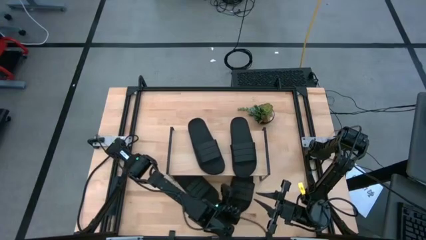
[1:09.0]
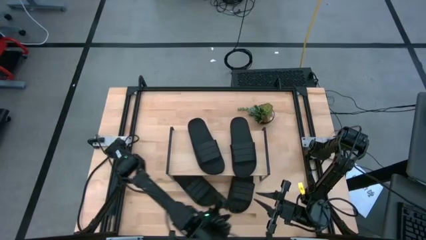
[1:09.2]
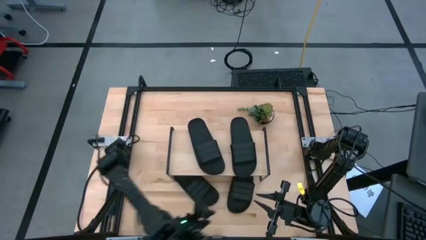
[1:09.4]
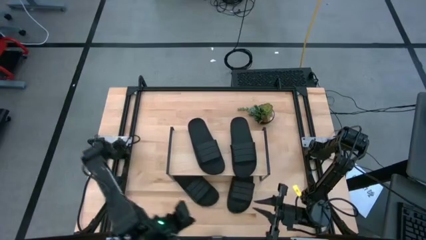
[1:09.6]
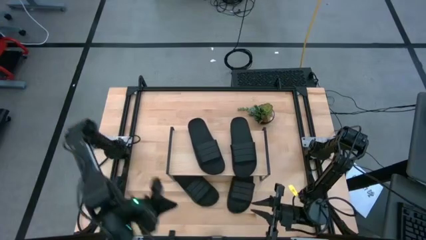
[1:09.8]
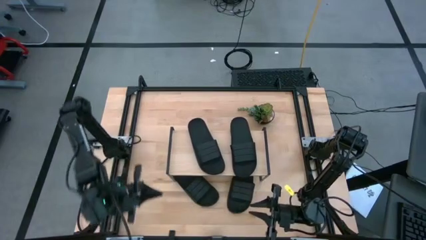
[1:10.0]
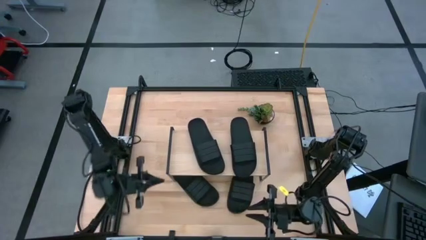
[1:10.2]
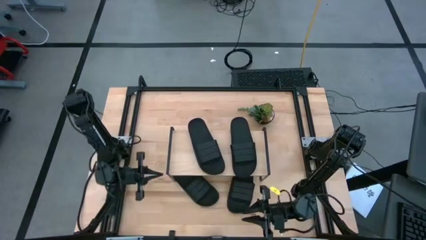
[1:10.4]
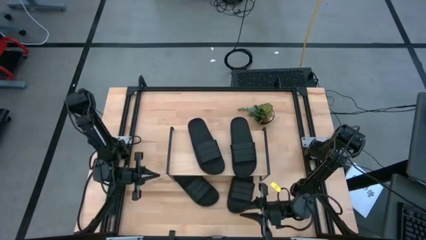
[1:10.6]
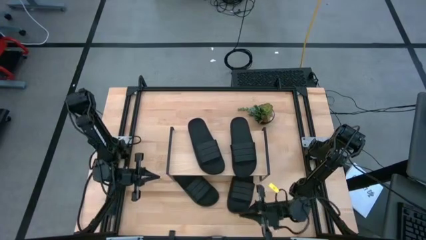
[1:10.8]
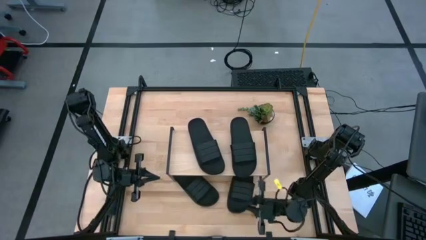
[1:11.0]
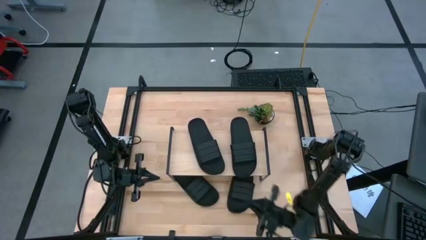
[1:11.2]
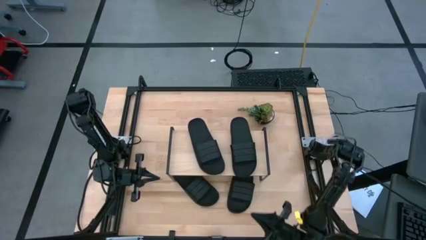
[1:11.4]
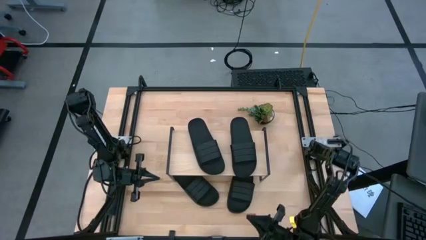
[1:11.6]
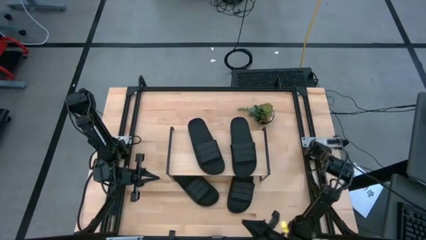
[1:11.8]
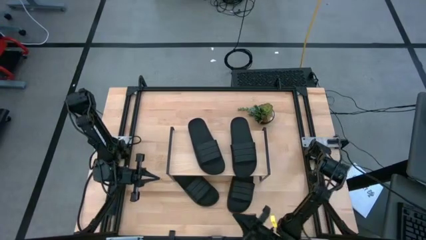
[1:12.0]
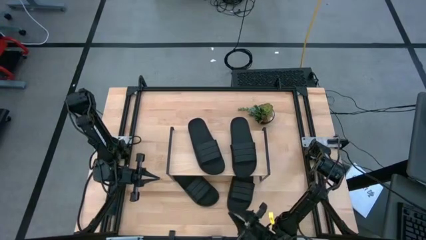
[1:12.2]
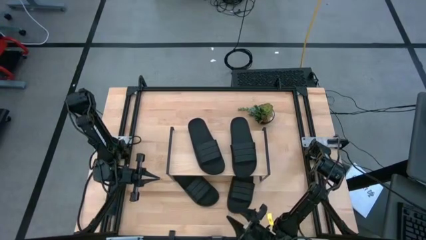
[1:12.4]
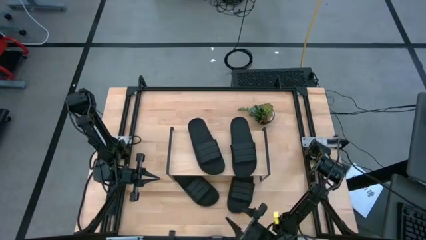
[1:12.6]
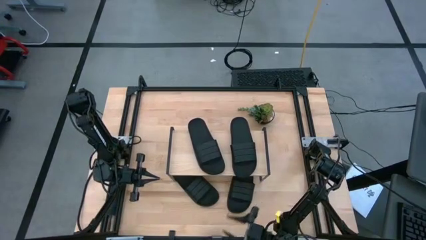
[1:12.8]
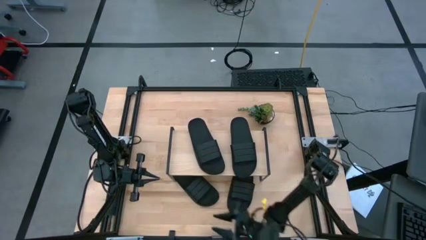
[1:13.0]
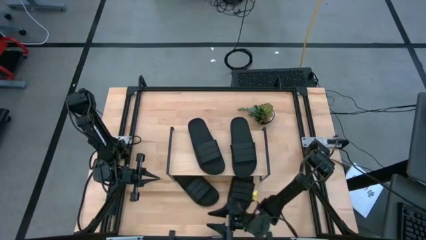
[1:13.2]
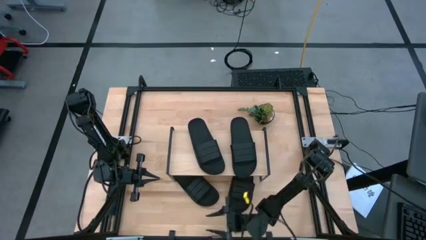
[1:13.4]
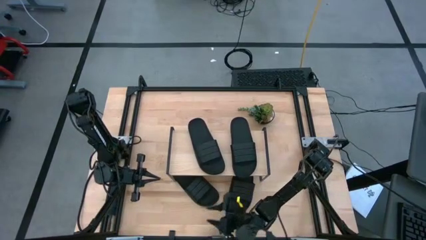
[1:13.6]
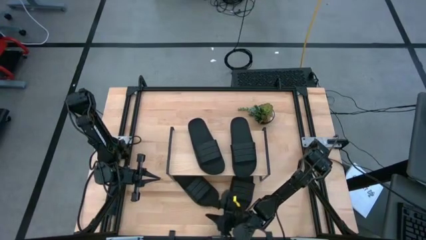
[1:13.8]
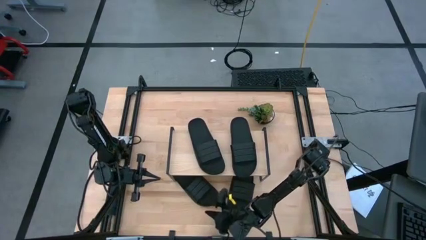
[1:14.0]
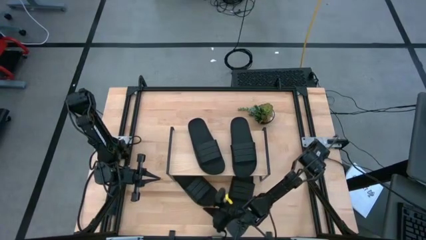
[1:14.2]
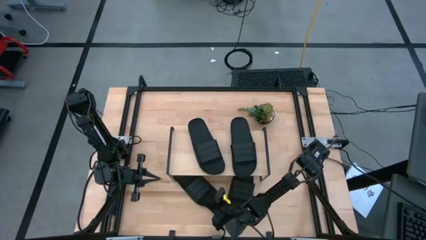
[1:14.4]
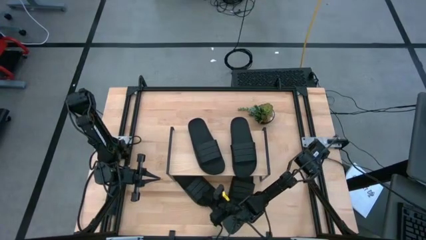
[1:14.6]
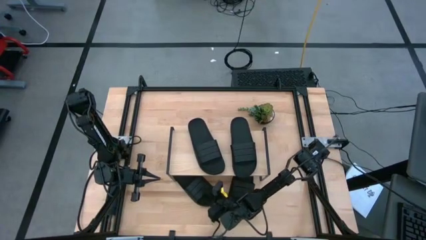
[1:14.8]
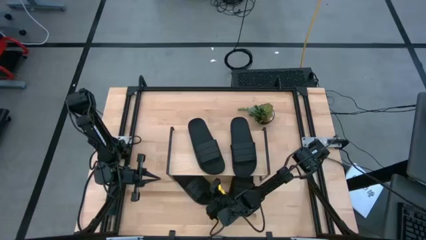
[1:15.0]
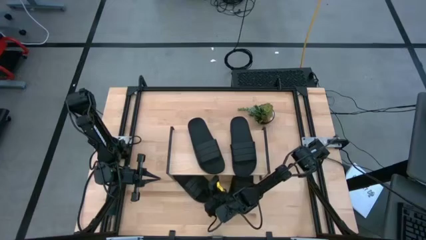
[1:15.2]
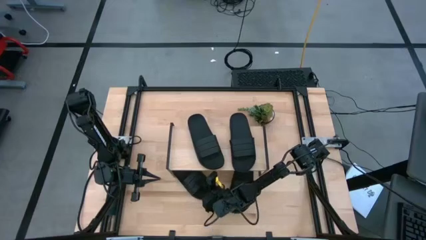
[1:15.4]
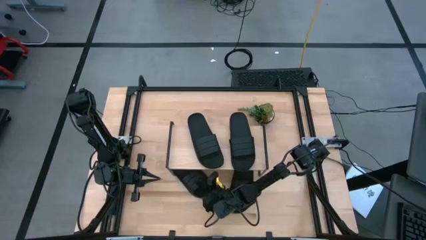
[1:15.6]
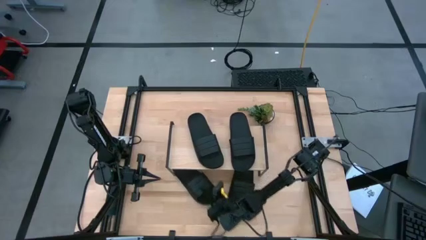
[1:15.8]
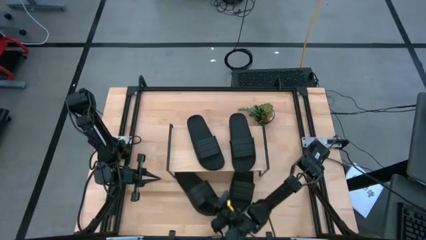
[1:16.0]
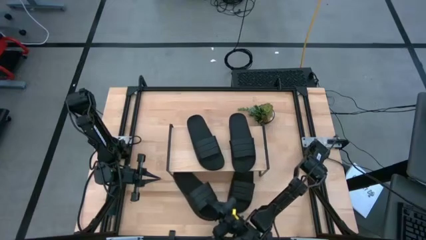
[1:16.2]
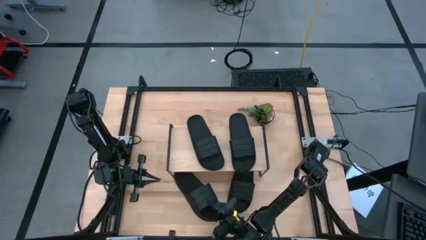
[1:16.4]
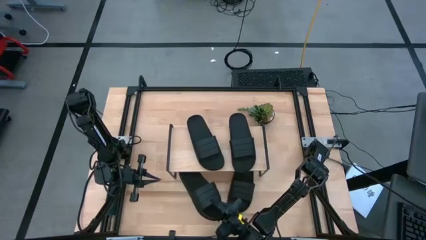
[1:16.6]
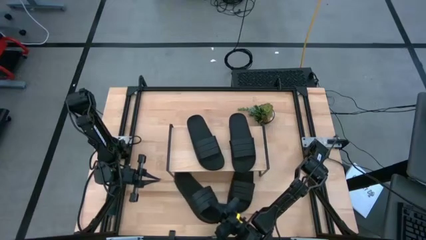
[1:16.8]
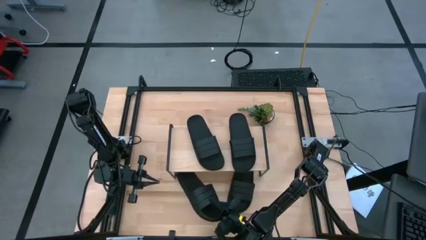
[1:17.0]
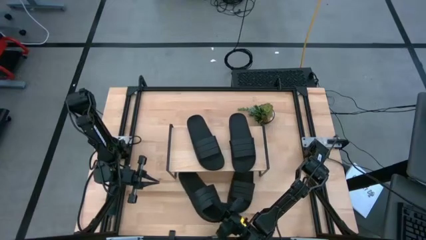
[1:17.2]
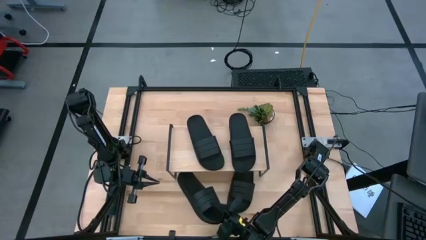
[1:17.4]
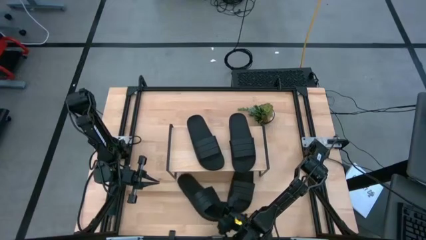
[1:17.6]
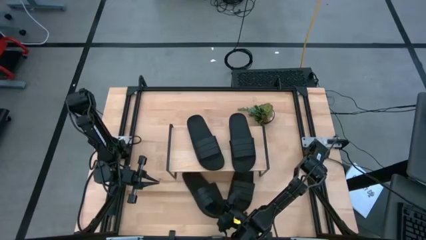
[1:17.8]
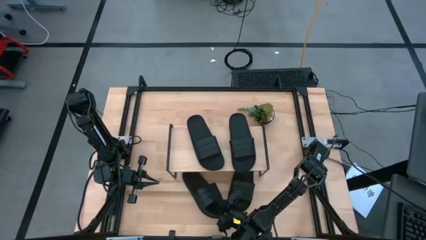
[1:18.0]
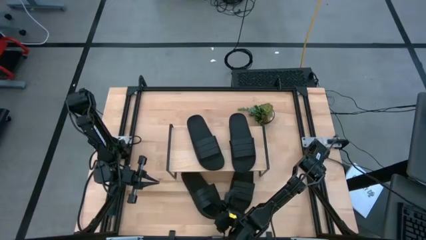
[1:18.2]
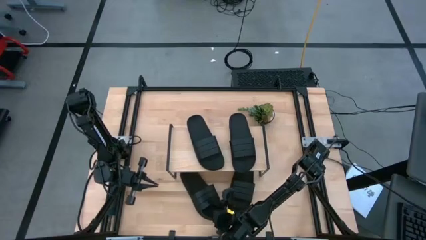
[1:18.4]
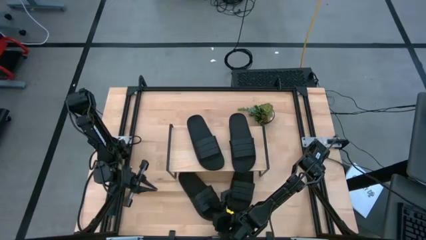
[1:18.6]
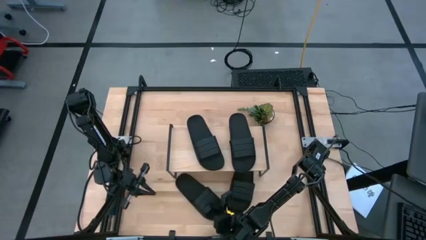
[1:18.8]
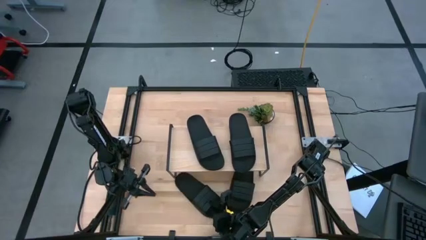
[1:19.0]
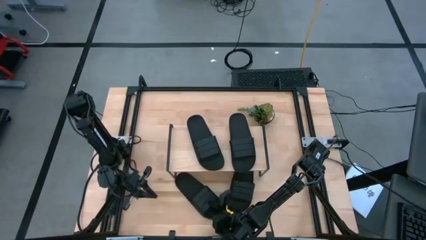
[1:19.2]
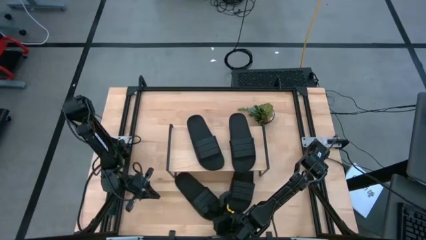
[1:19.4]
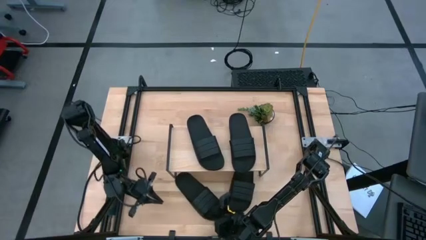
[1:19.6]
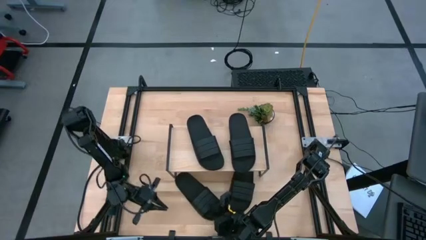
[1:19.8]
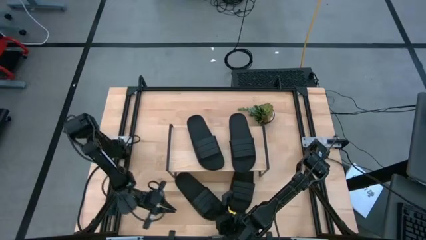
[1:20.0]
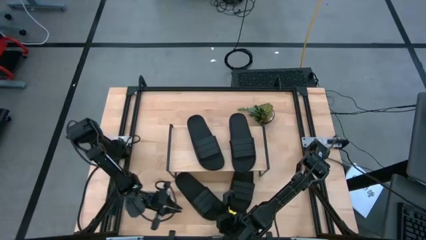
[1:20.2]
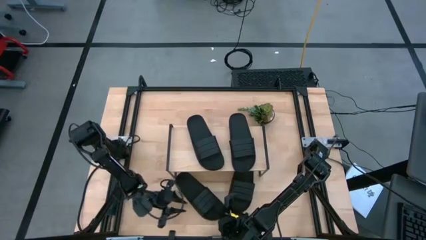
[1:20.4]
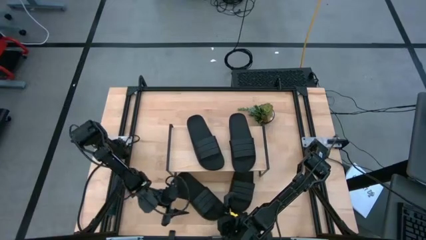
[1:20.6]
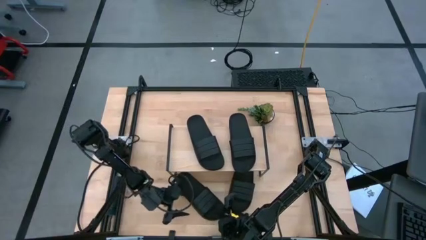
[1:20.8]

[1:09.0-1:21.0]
Task: Pick and place slides into the shelf
Adjust the black slide under the shelf

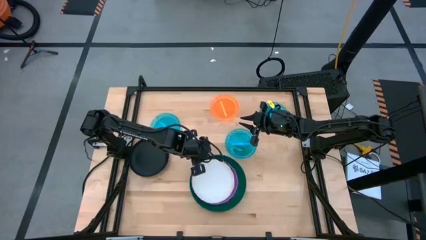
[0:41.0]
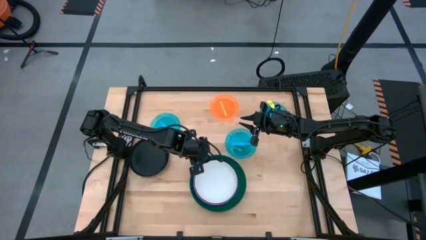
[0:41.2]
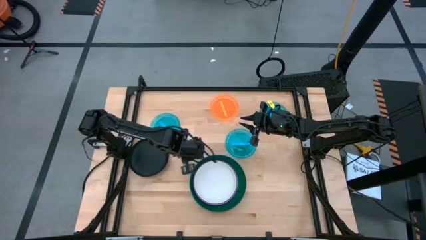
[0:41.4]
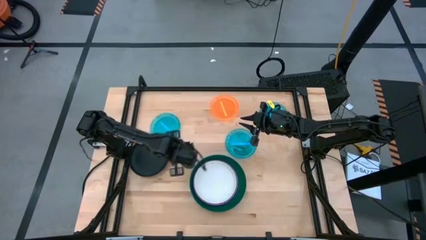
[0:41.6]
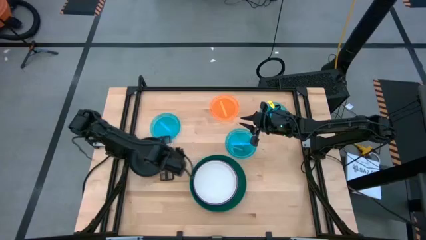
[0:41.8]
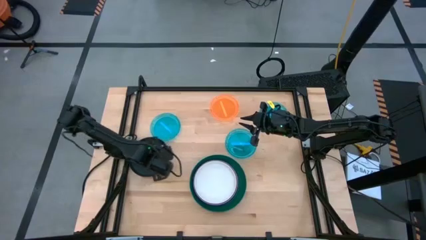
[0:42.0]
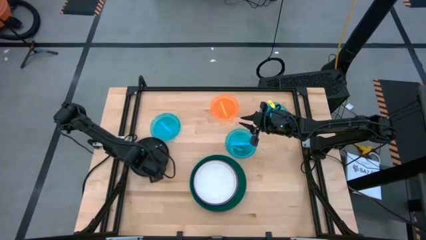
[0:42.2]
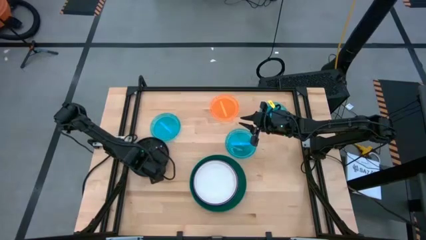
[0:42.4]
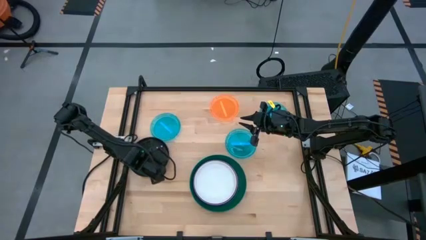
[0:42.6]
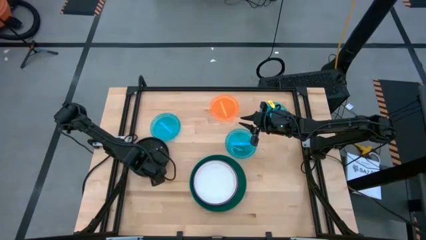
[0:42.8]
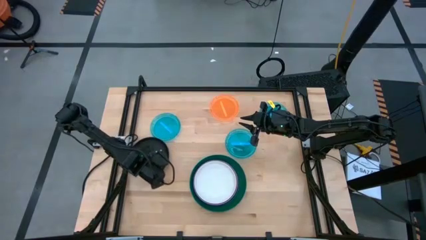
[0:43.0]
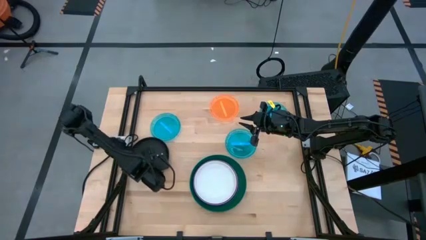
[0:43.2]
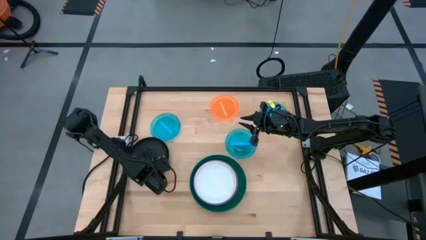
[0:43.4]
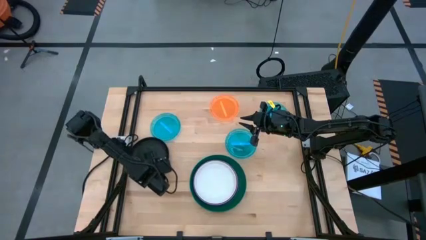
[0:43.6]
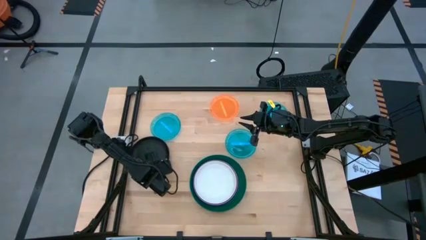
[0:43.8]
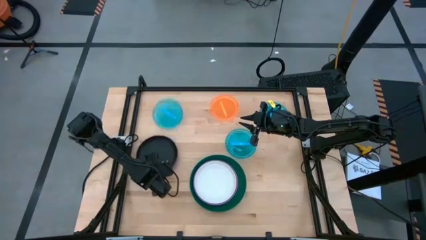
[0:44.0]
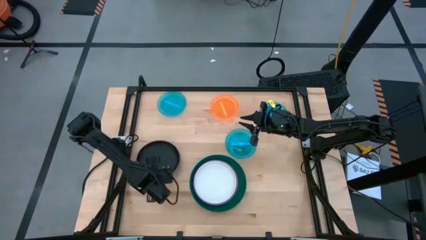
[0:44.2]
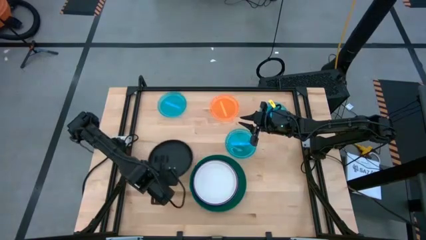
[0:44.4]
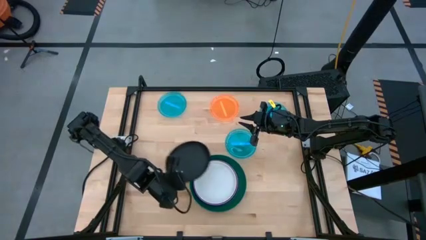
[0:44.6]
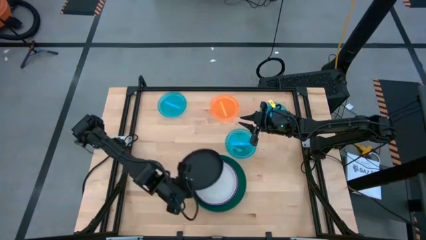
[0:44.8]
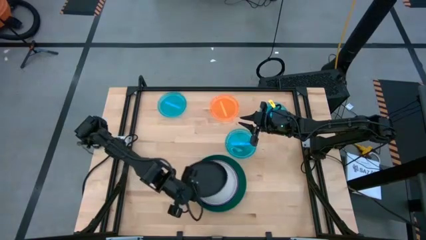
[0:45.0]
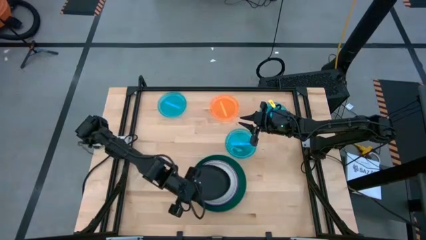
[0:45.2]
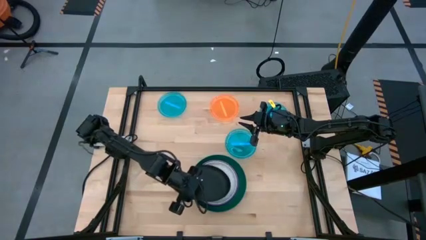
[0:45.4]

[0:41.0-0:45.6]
Task: Stack plastic plates
Stack the black plate on top of the white plate
